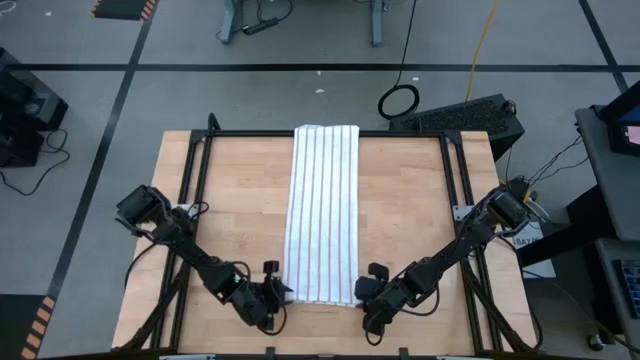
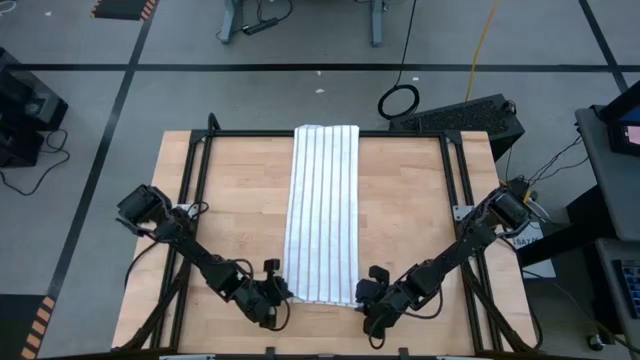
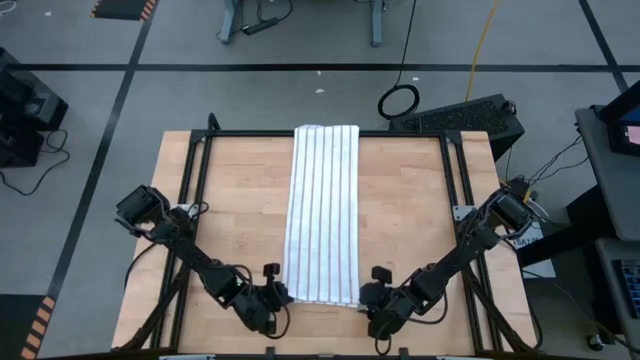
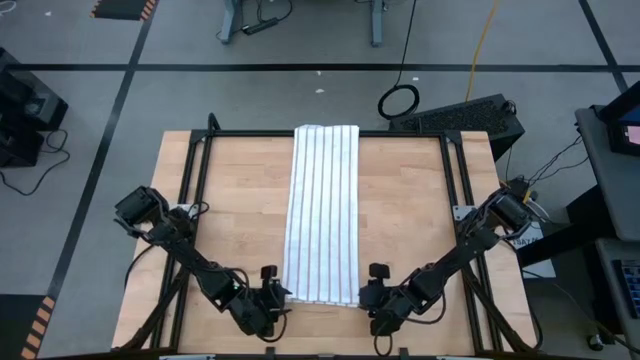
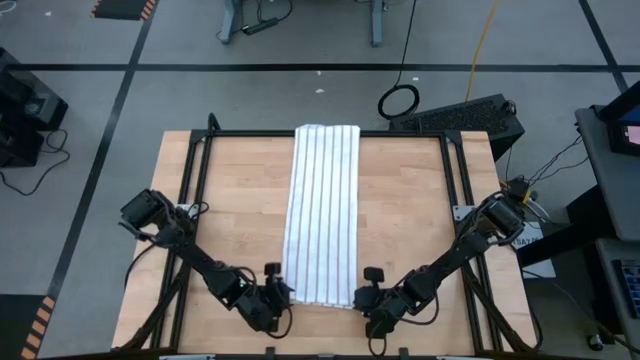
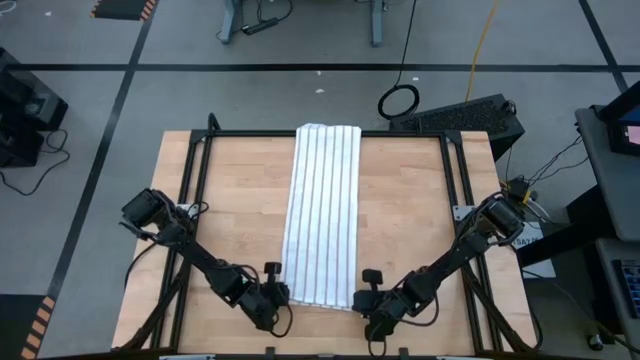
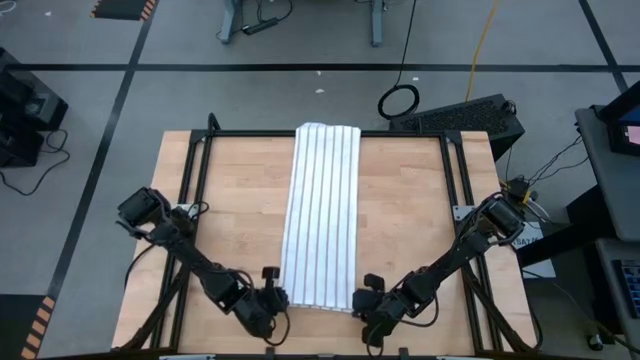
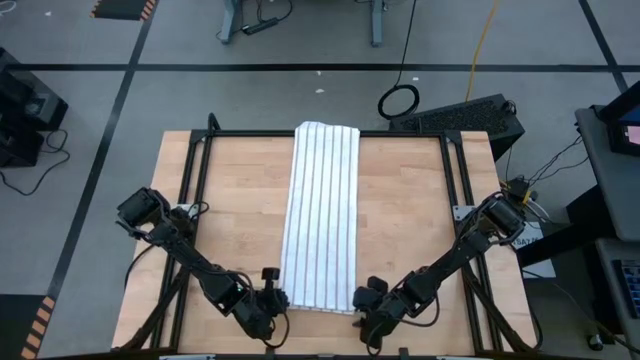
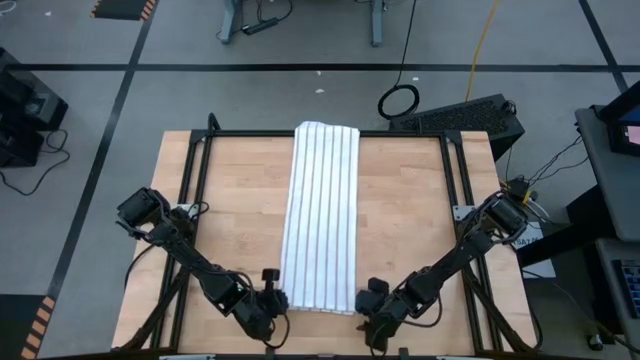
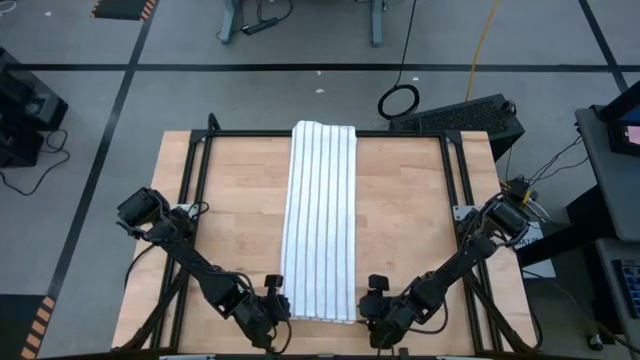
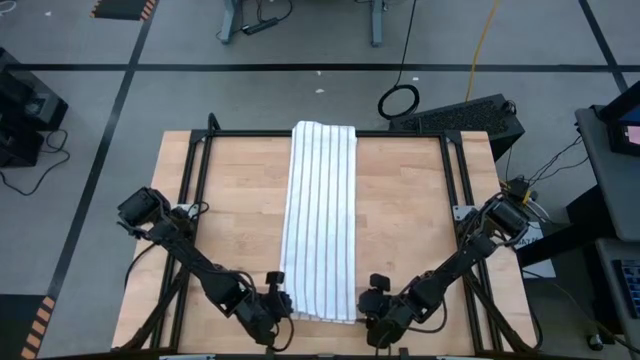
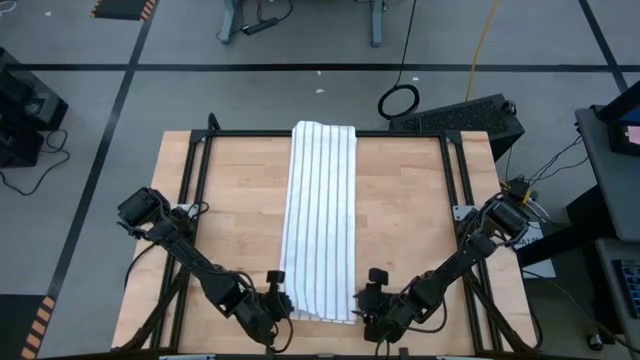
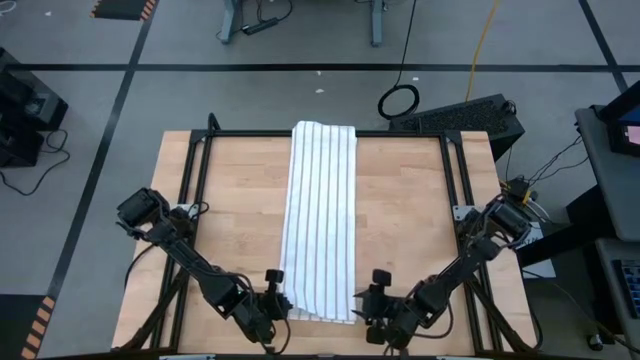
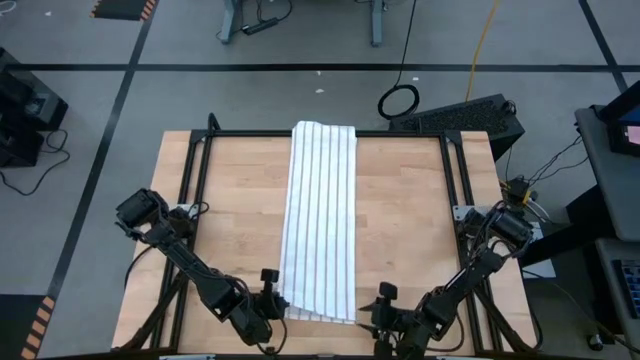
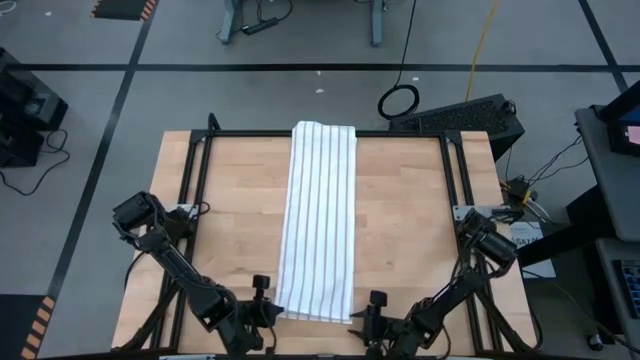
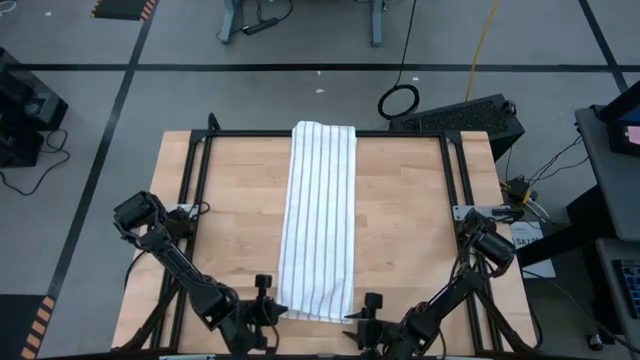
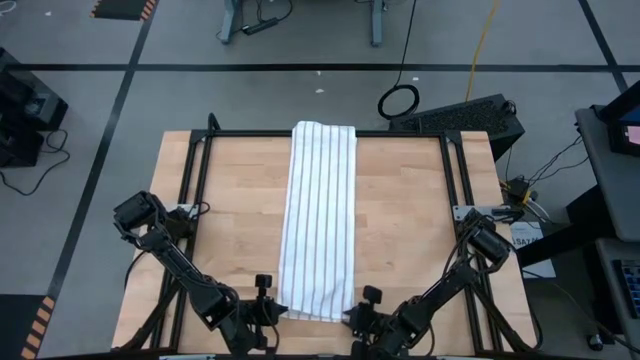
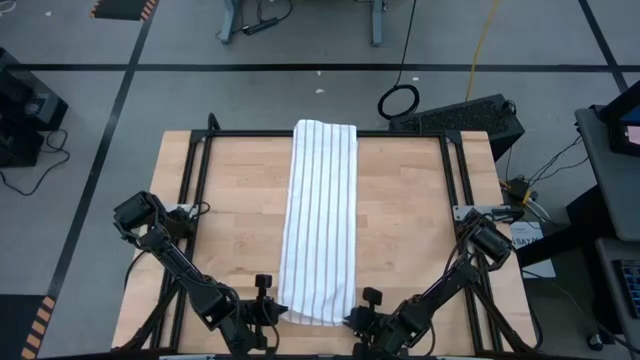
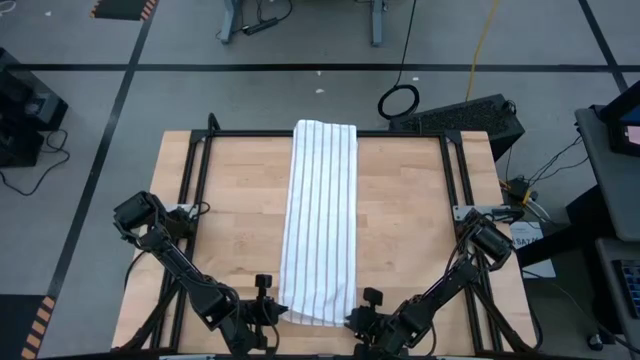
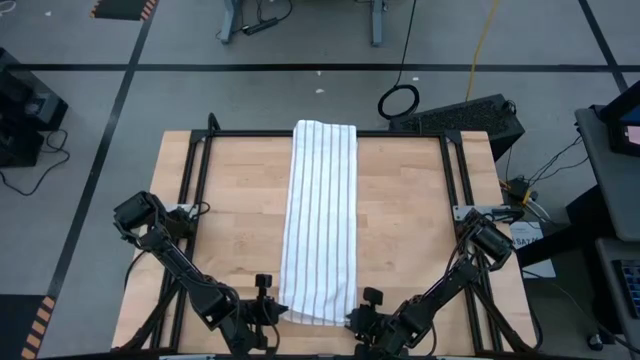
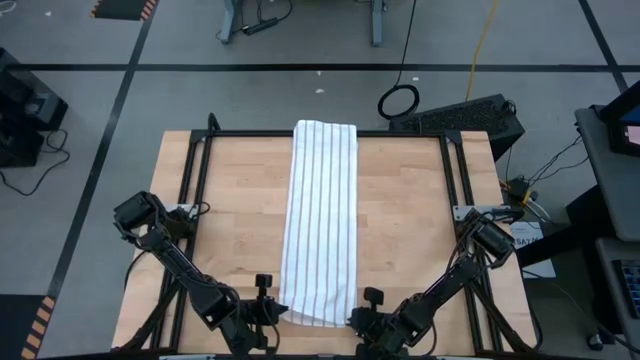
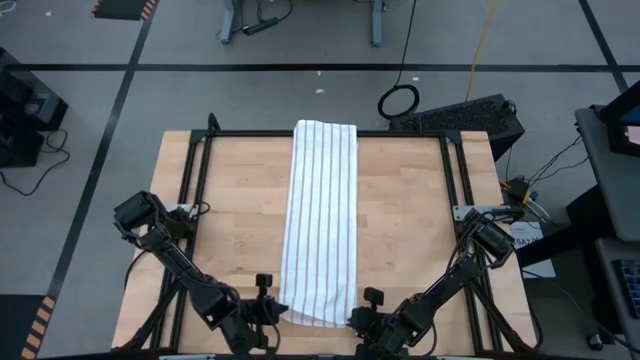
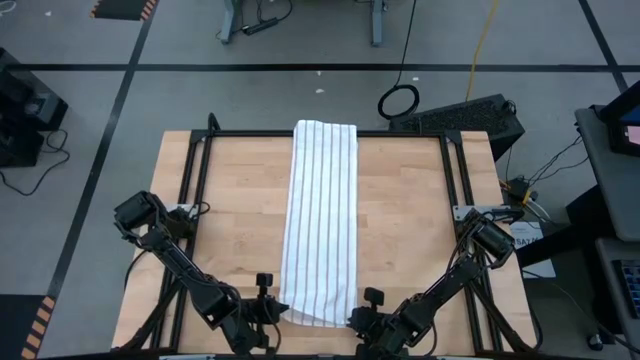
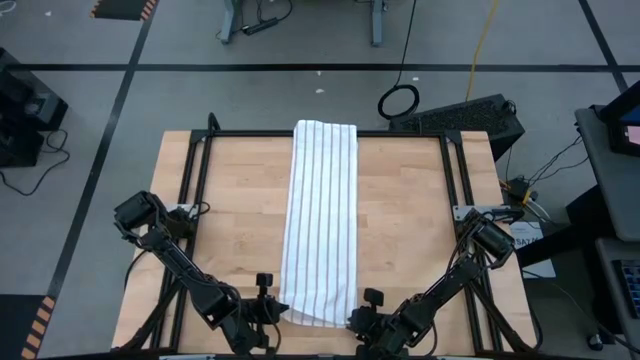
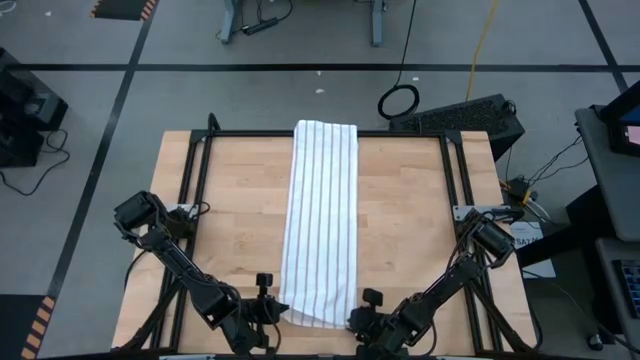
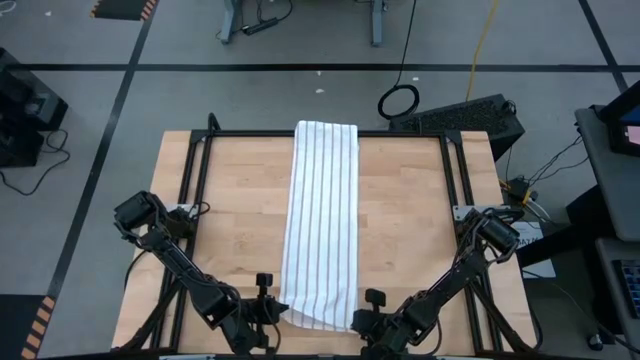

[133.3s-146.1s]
Task: Roll towel into tight, uniform cylinder
Fold the white brown kitchen towel

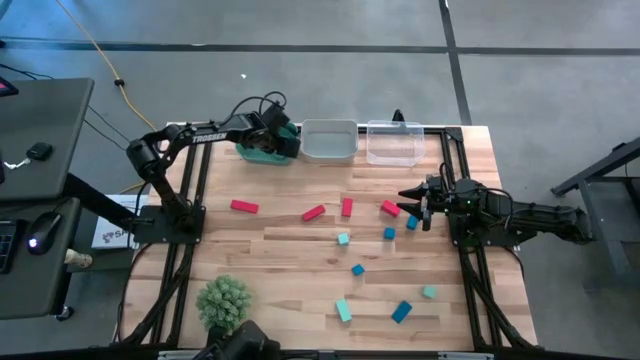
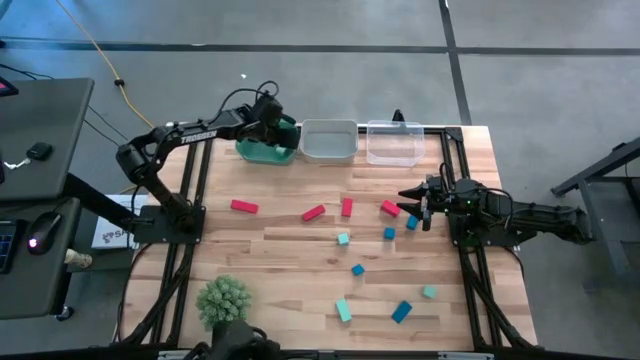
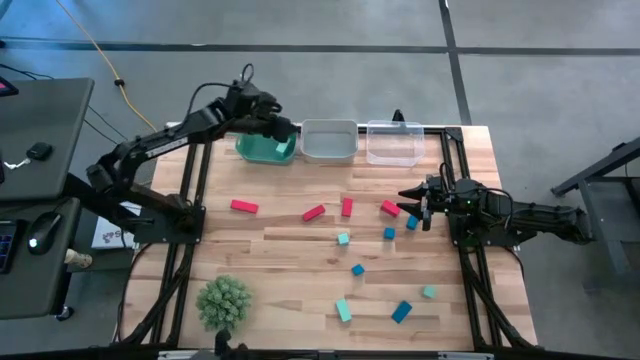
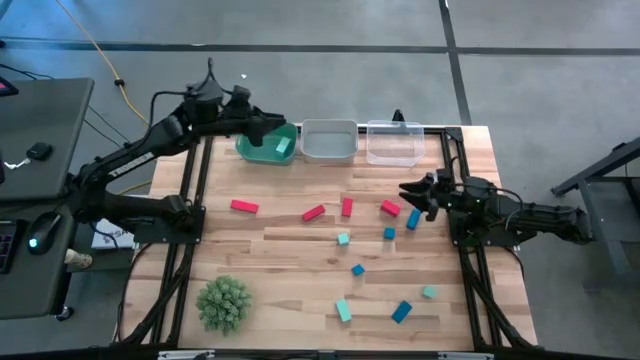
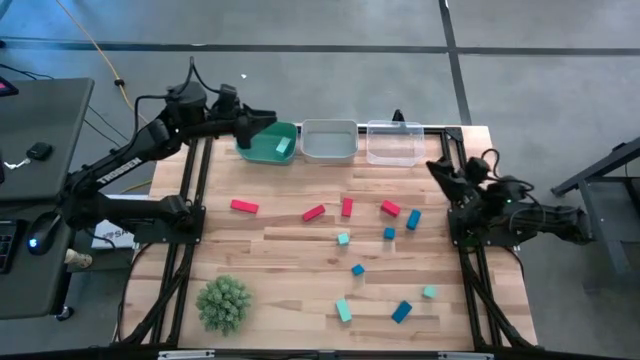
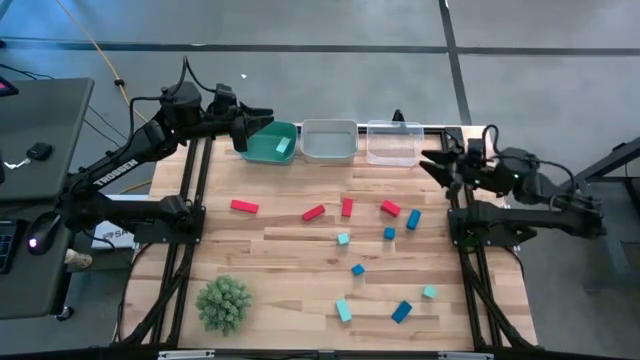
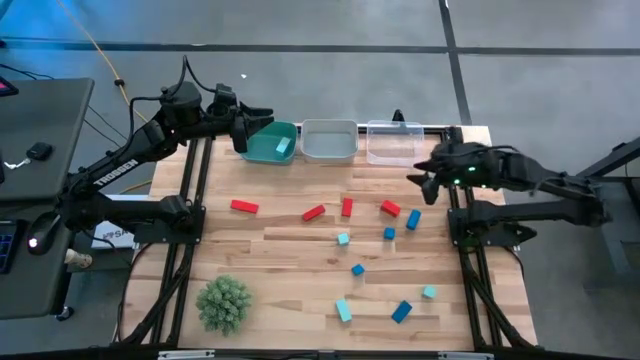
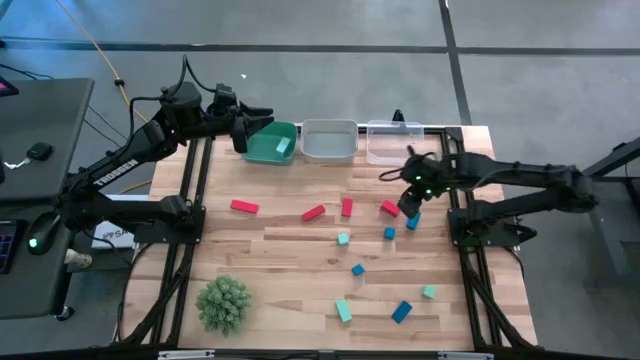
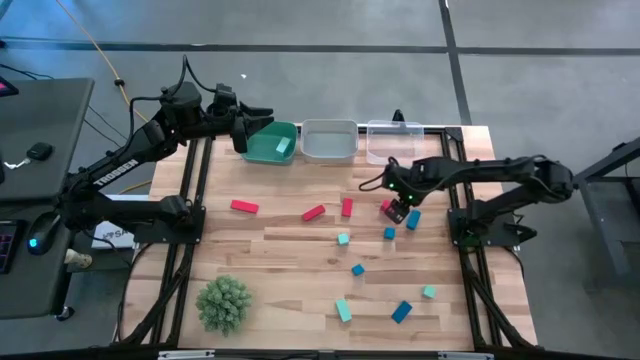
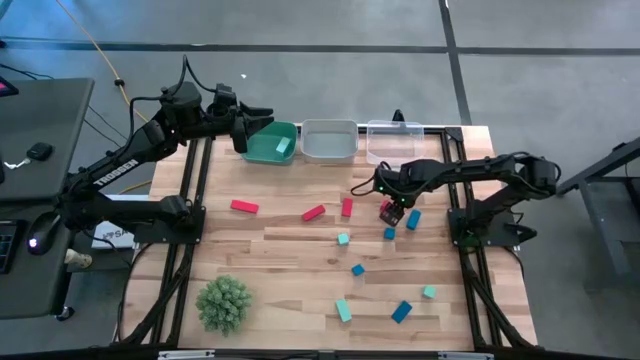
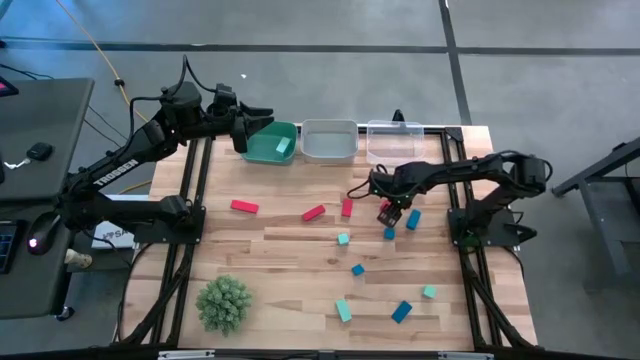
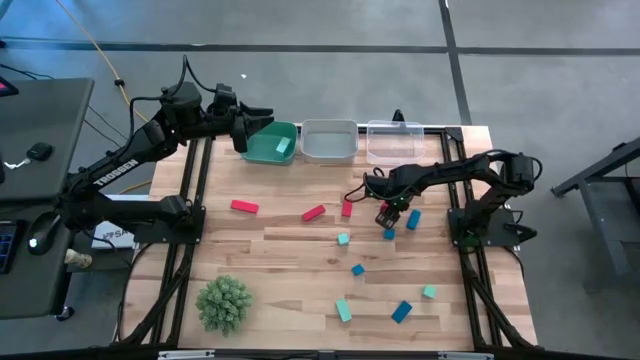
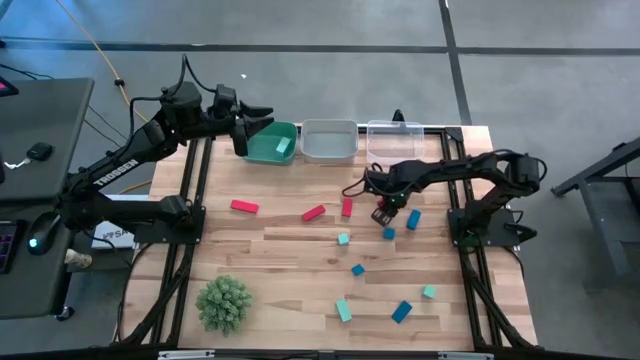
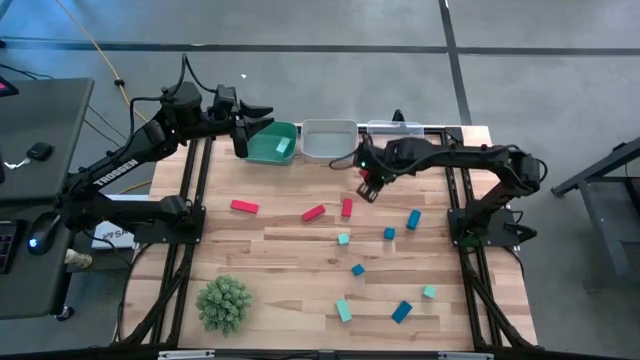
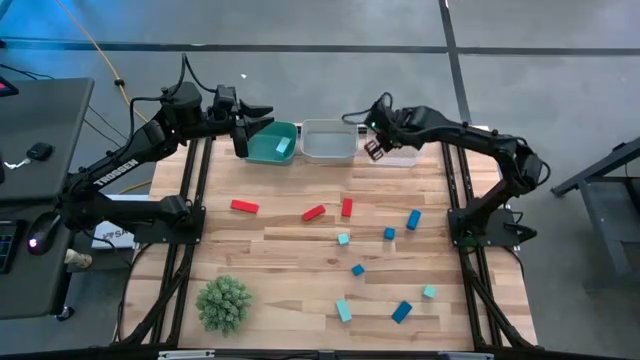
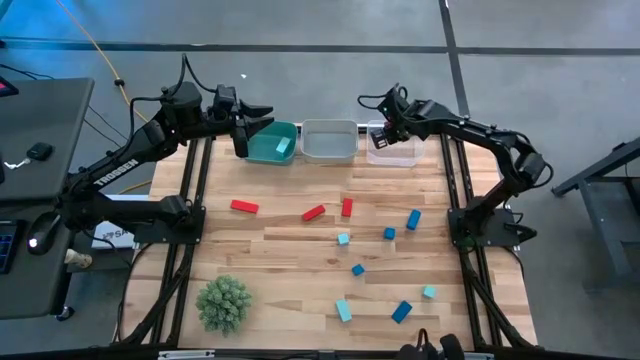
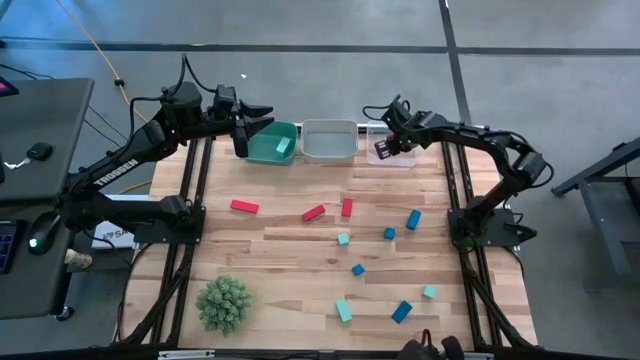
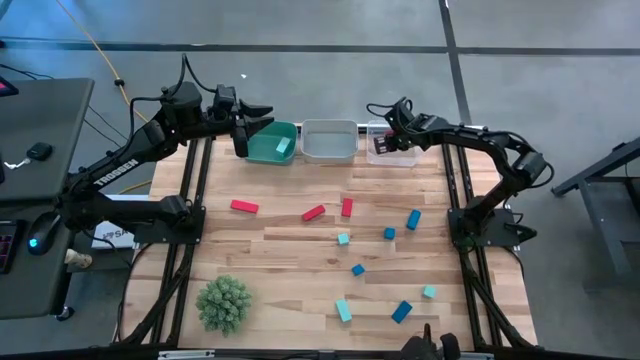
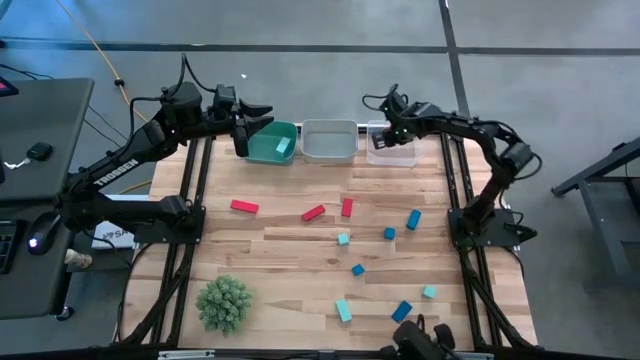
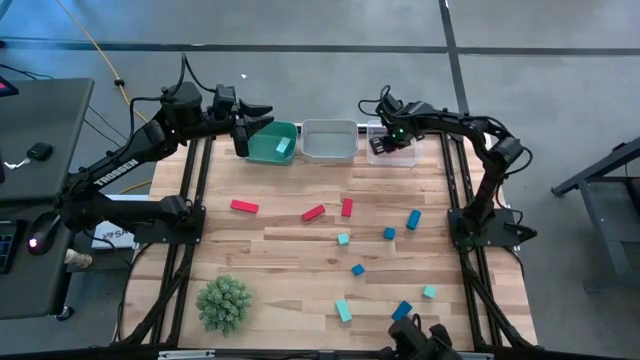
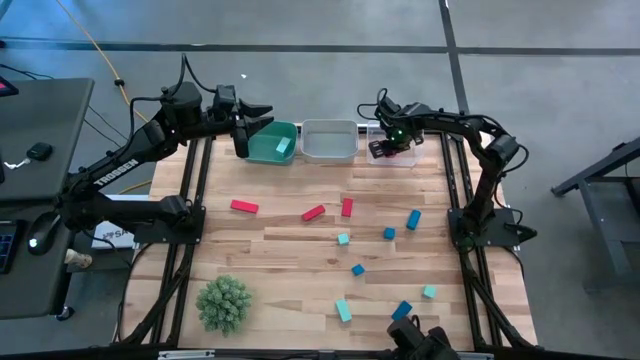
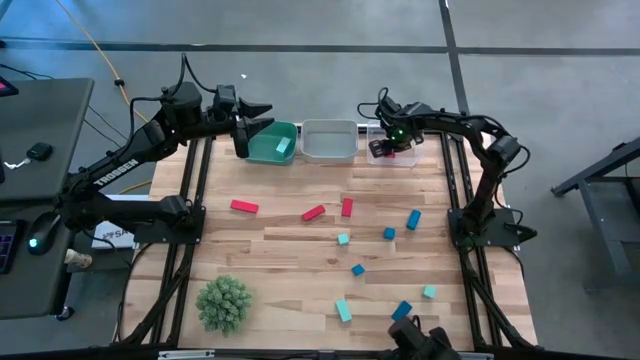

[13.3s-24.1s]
Task: Sort & place blocks by color
Put the red block into the transparent bin
